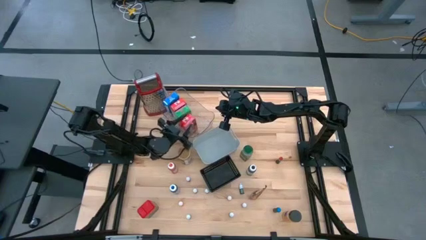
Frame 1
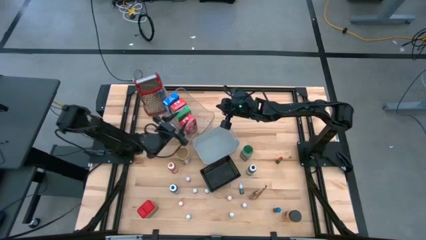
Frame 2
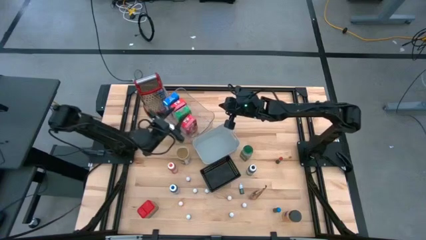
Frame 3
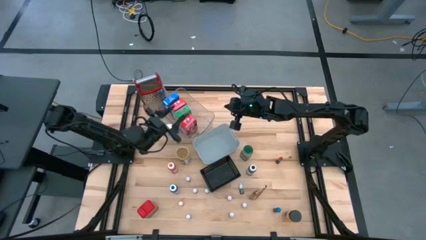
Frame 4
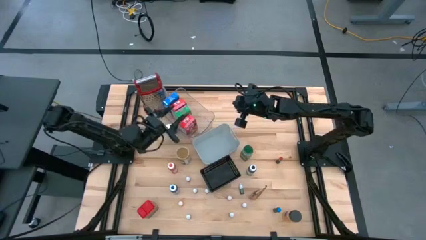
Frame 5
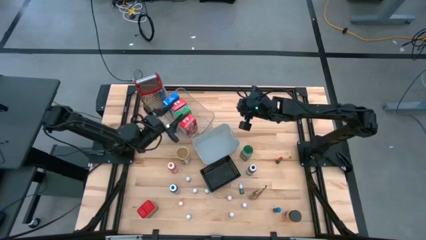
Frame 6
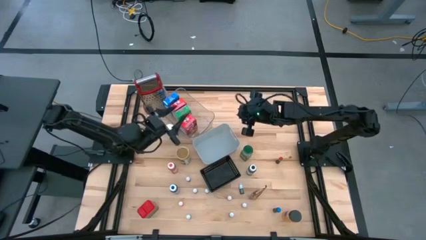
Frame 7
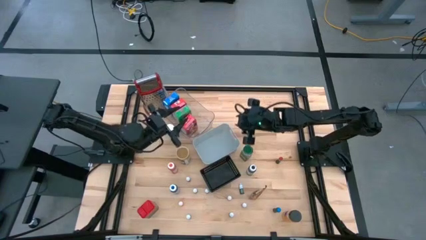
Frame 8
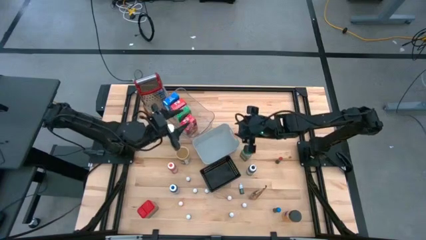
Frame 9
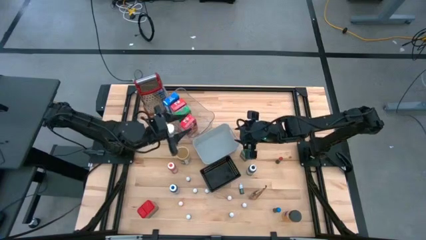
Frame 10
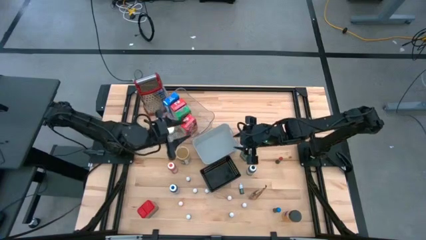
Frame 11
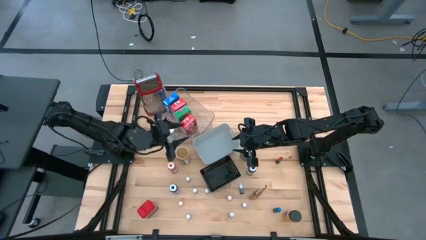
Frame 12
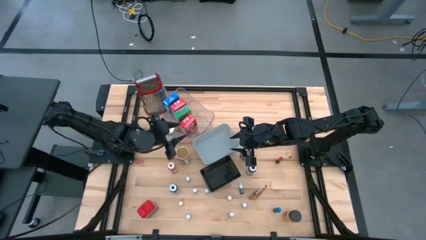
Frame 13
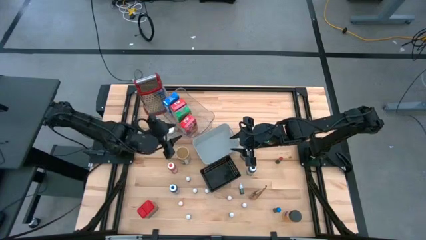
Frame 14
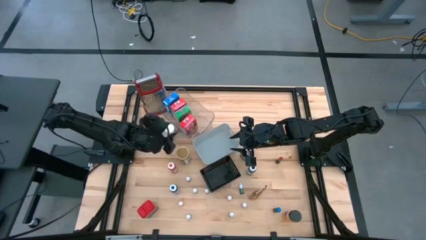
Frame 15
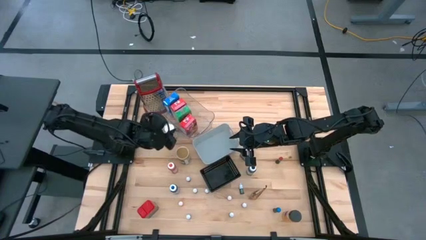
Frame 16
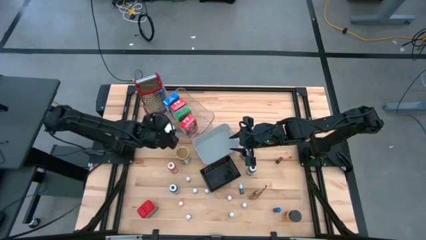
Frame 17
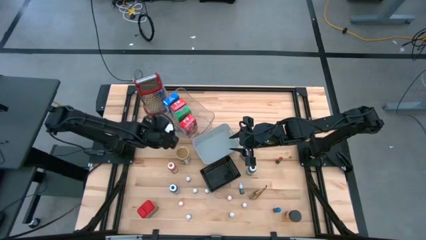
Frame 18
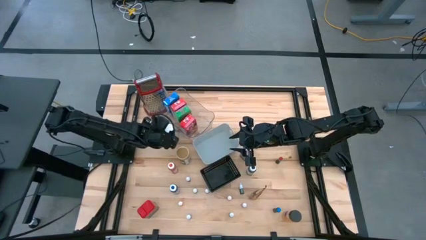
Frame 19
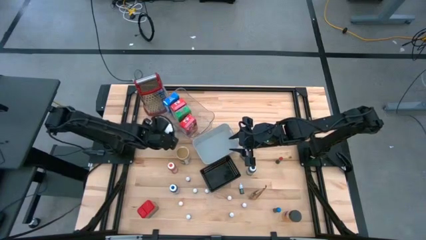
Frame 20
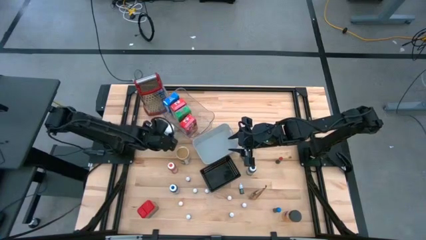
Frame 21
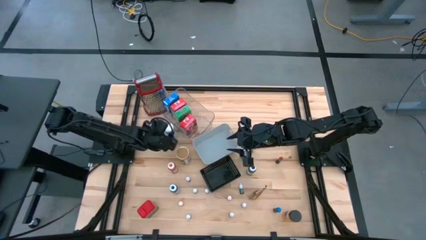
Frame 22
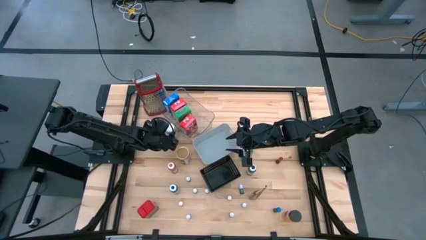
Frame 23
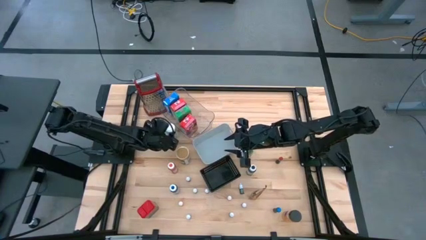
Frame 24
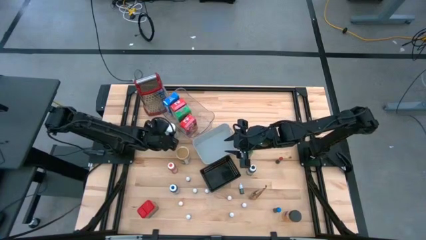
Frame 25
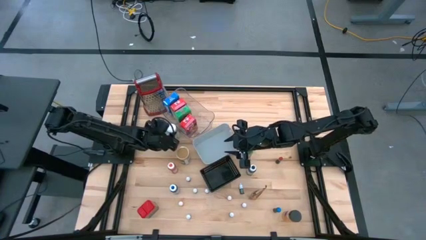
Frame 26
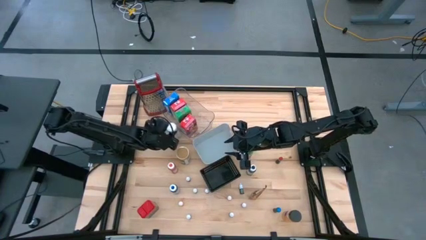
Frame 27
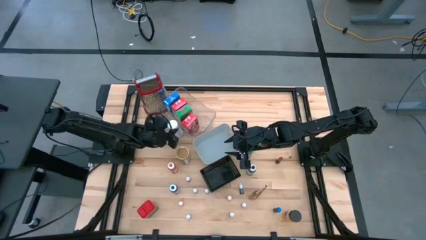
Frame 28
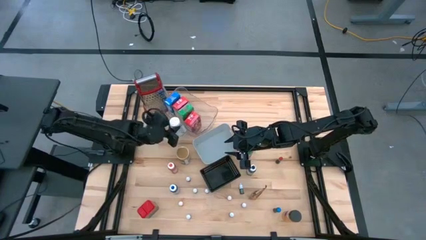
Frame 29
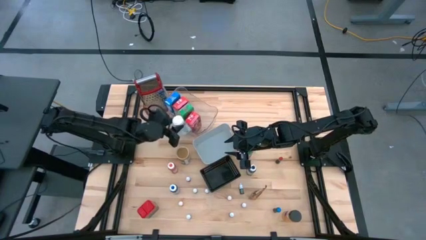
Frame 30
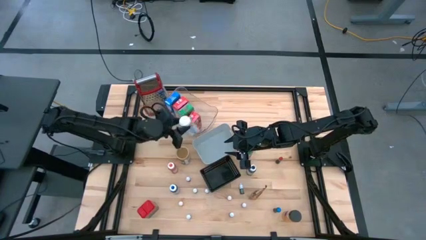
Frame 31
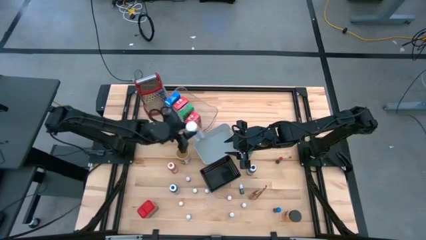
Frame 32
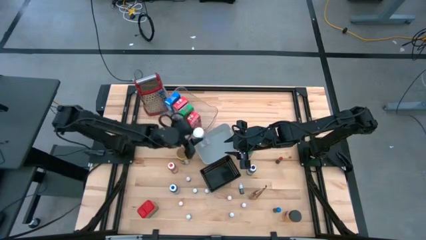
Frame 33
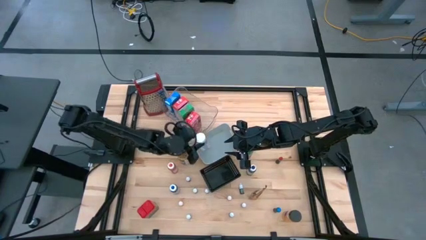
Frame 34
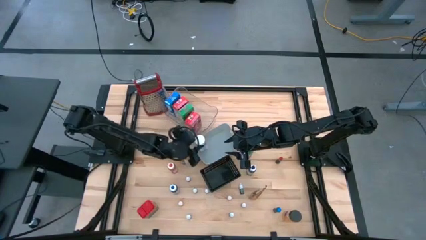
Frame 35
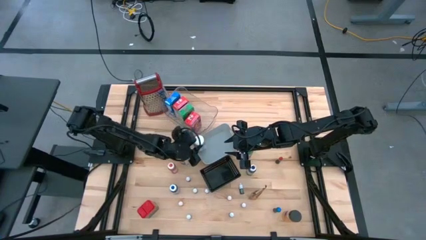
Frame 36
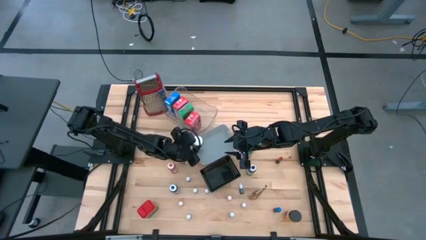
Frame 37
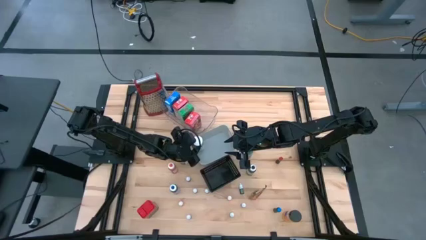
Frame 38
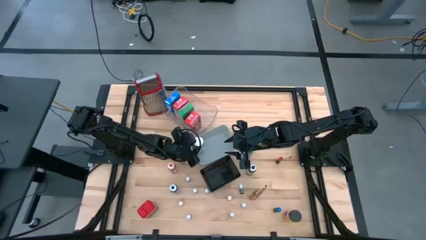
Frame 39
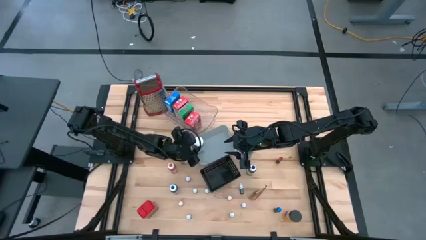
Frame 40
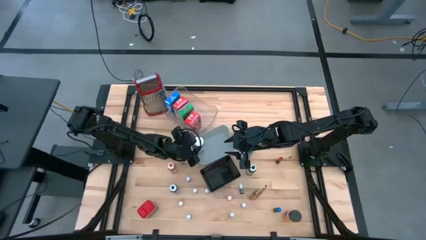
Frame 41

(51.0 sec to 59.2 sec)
Task: Pick & Place Kitchen Items
Put the white seasoning bottle into the white bin

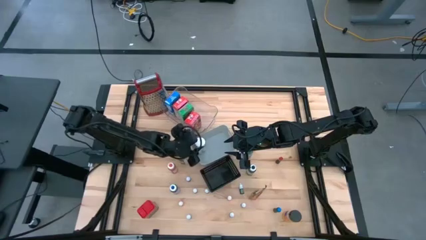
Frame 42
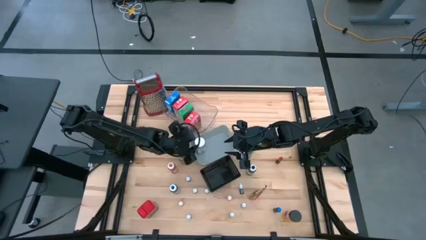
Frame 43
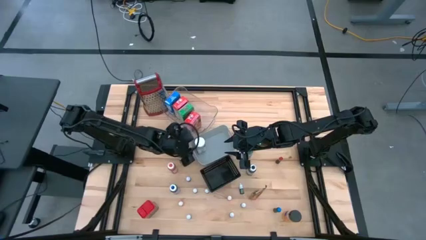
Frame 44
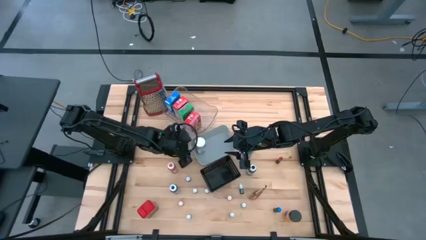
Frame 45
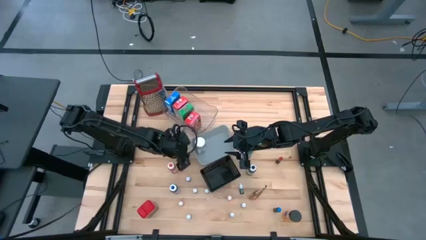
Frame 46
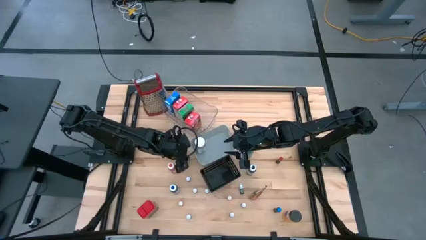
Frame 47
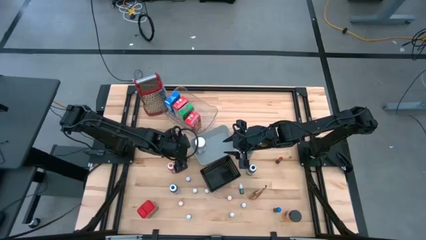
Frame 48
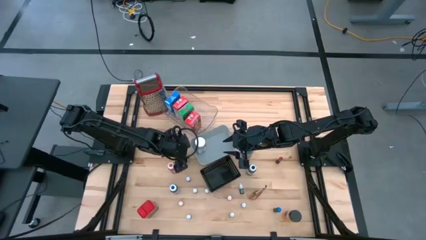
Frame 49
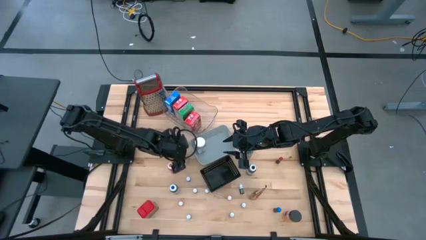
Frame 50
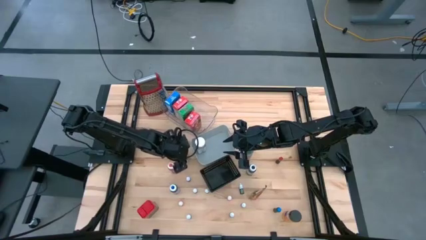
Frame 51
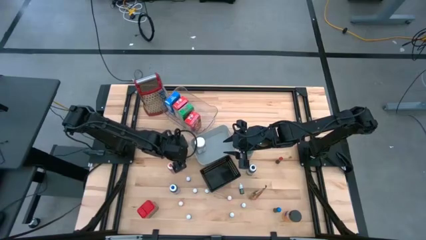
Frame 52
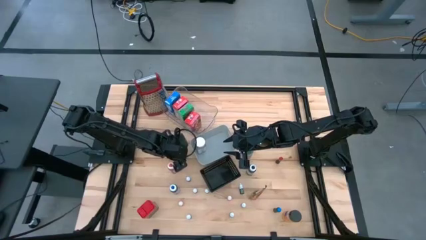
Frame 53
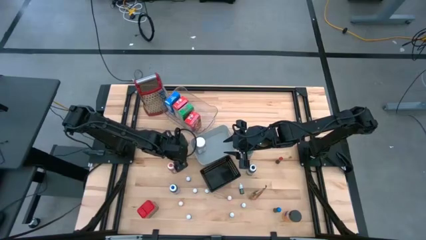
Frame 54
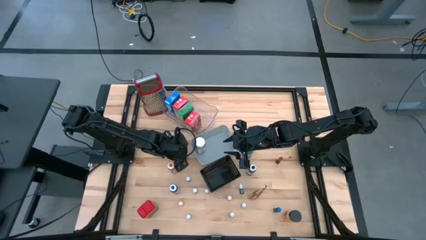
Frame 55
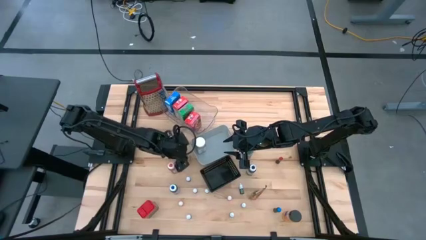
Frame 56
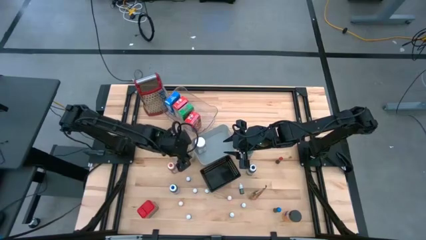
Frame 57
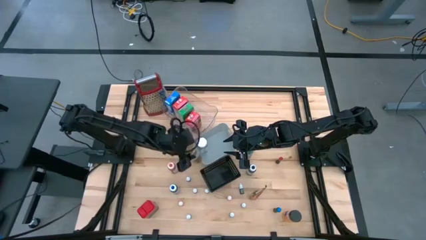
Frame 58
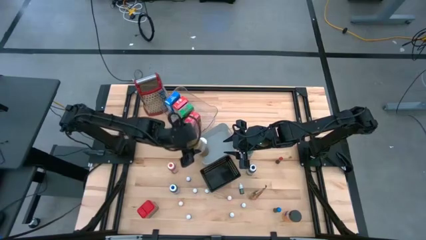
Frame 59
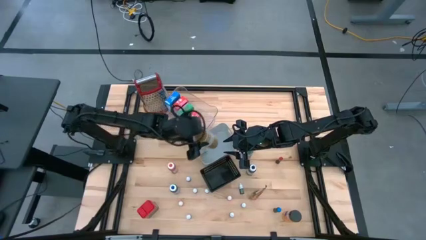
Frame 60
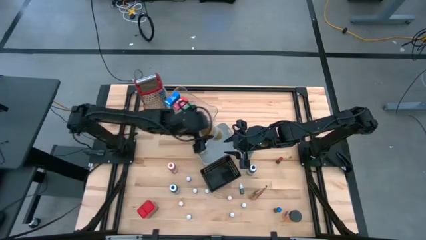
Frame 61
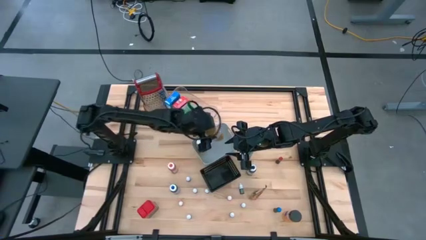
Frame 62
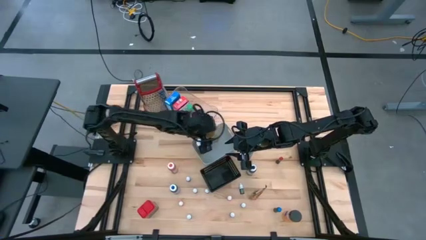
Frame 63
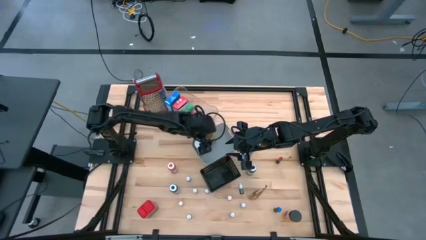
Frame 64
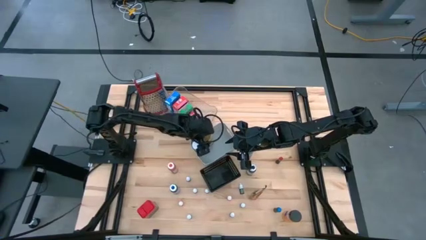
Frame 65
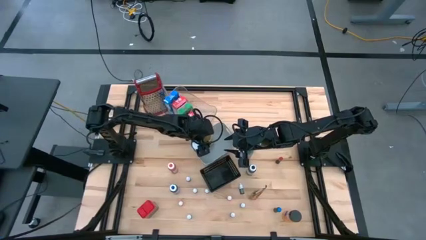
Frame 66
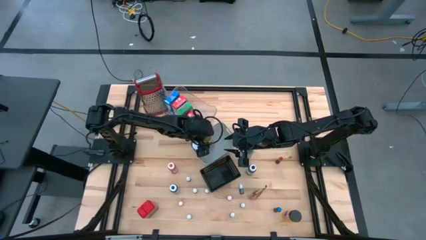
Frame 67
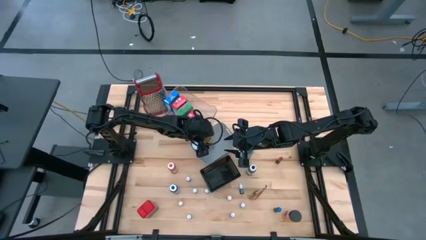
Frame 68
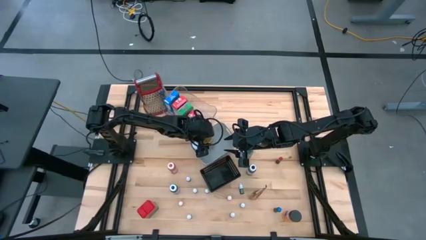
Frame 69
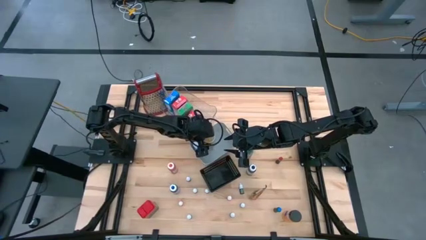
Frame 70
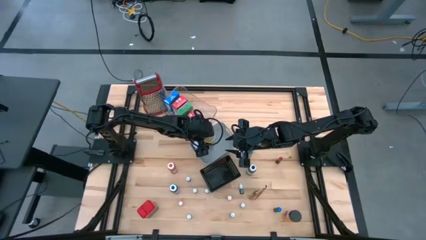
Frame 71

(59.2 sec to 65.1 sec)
Put the brown seasoning bottle into the white bin

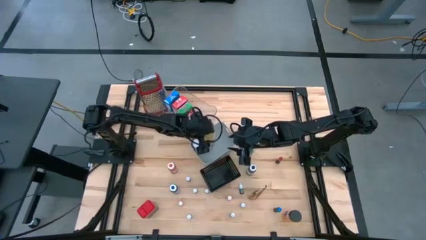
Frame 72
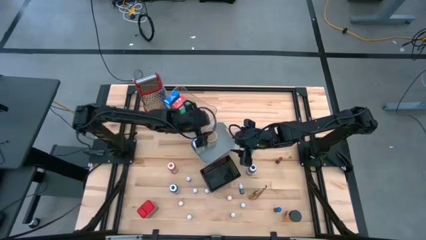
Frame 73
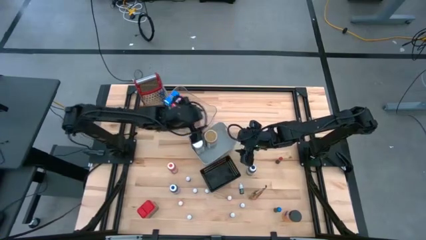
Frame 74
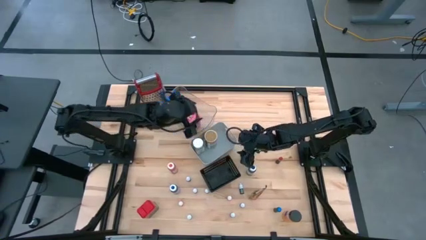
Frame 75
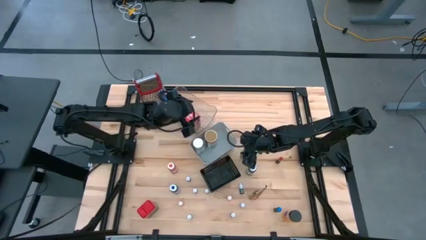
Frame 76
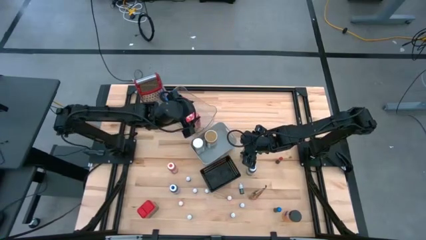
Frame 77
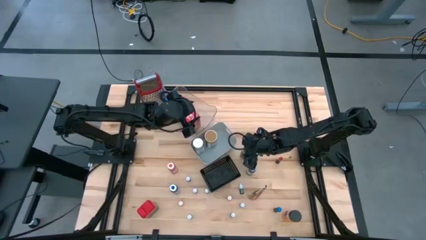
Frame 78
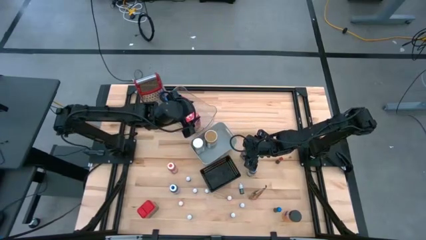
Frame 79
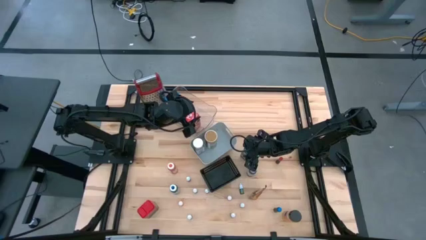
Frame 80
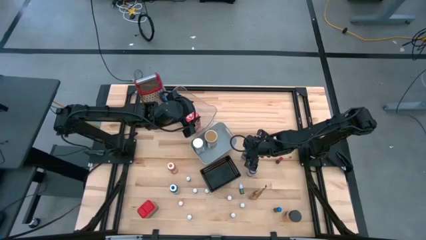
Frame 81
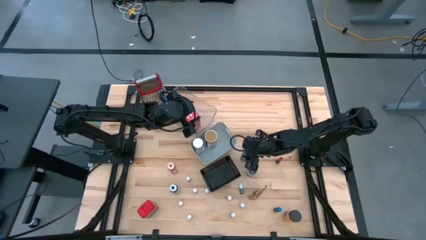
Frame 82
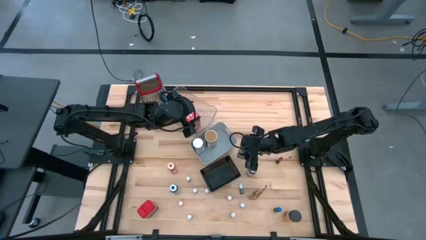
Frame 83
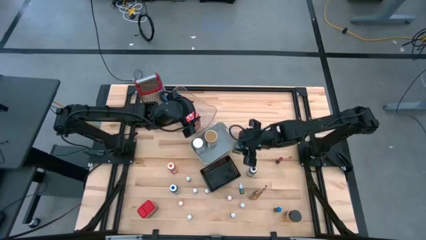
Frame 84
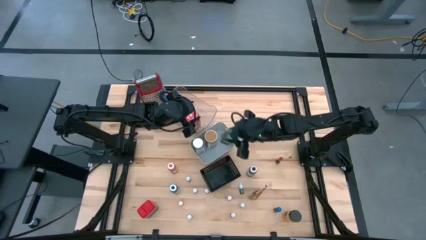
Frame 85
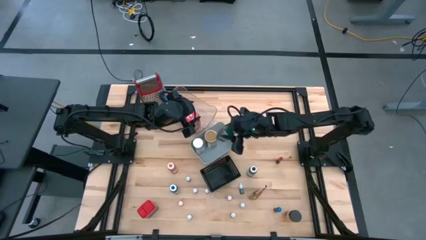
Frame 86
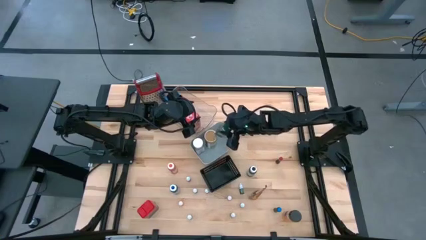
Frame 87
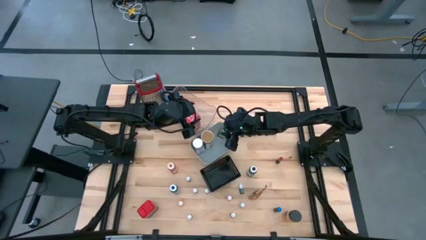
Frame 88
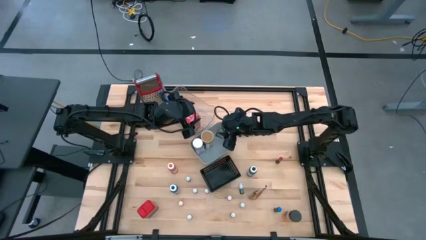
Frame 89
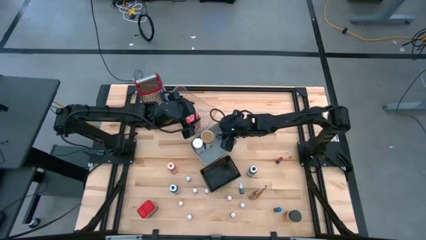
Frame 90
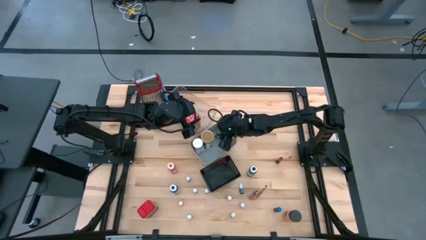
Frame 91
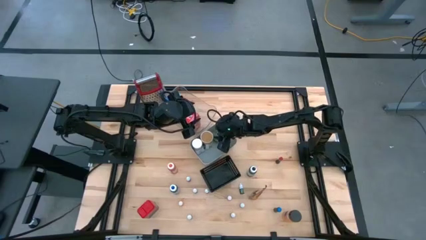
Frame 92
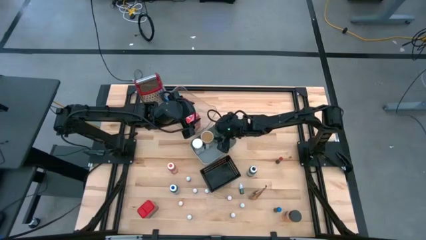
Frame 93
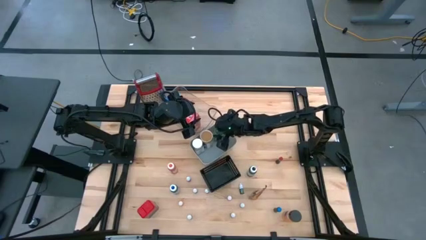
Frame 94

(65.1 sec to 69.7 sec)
Put the green seasoning bottle into the white bin
